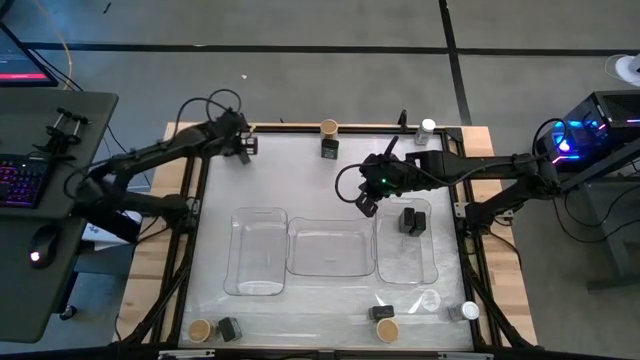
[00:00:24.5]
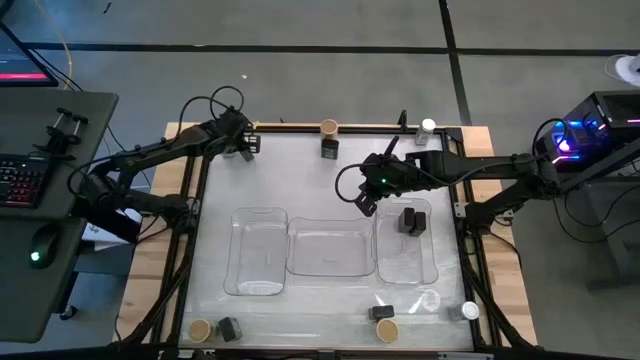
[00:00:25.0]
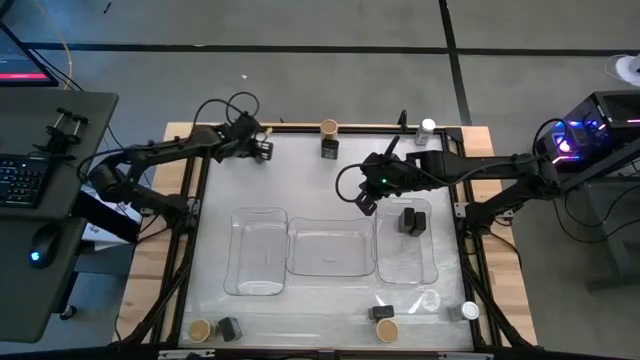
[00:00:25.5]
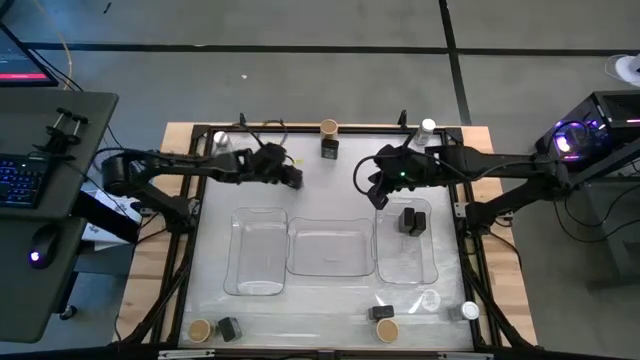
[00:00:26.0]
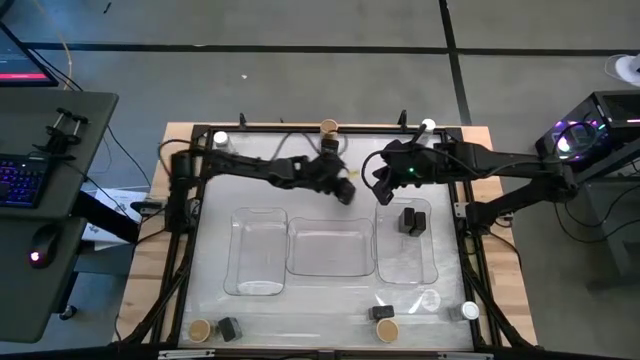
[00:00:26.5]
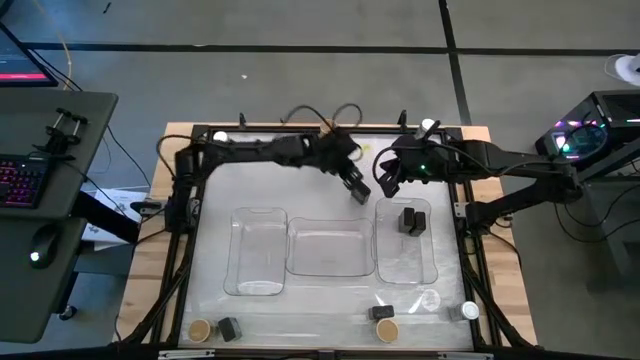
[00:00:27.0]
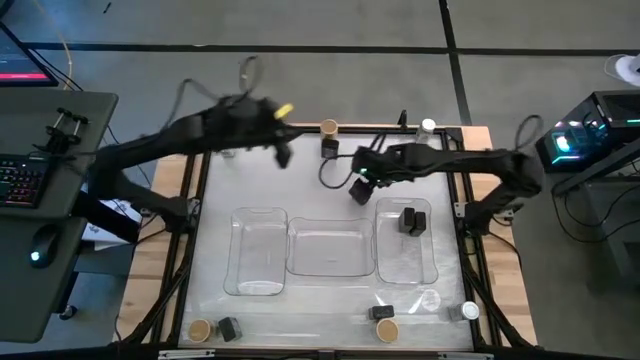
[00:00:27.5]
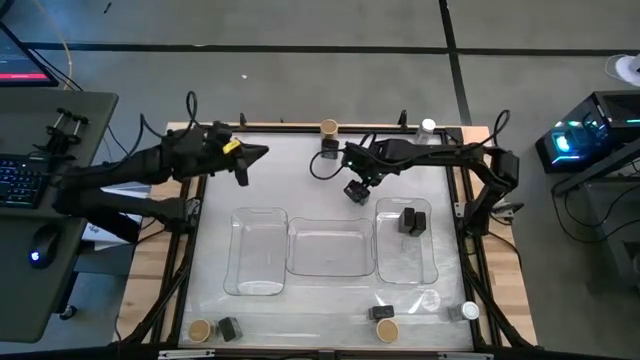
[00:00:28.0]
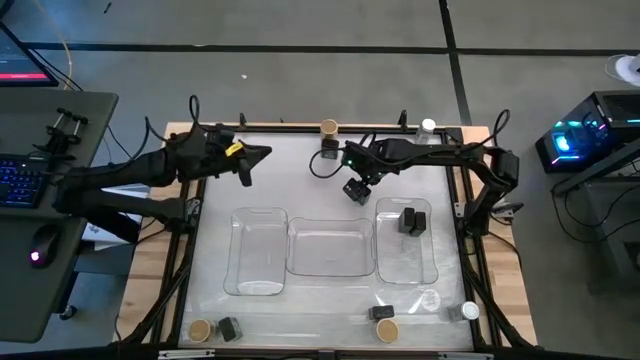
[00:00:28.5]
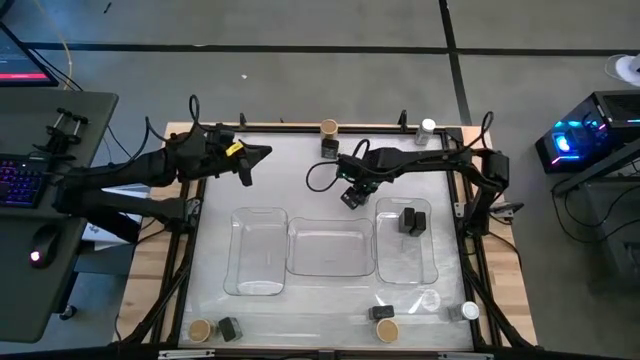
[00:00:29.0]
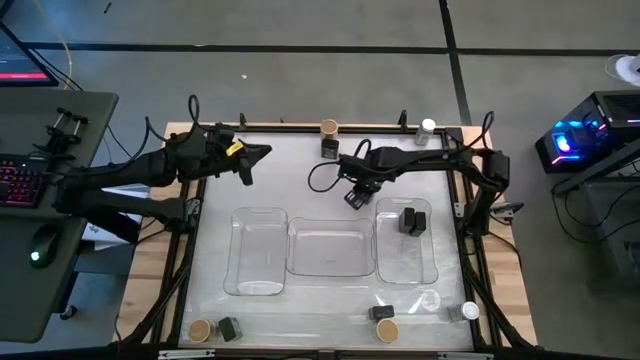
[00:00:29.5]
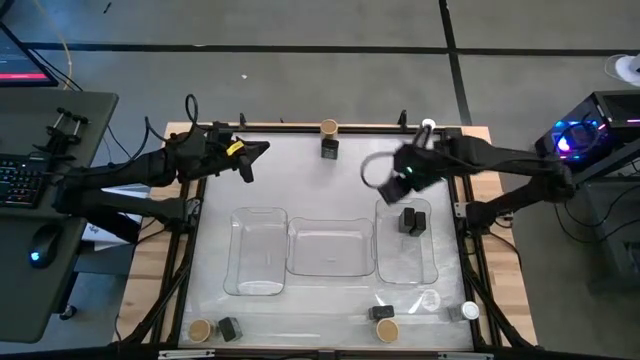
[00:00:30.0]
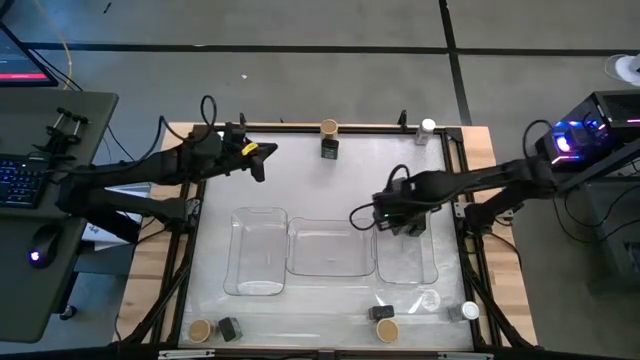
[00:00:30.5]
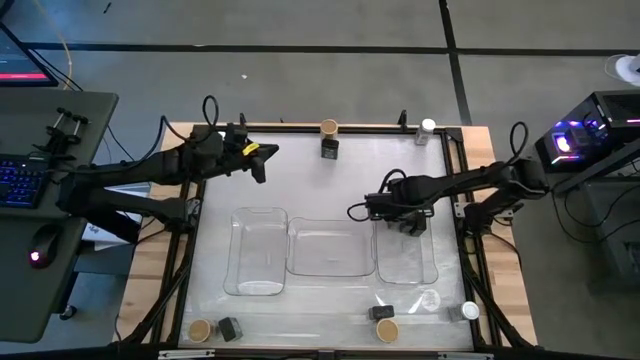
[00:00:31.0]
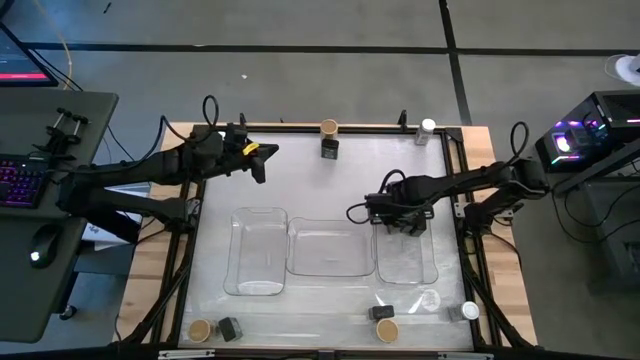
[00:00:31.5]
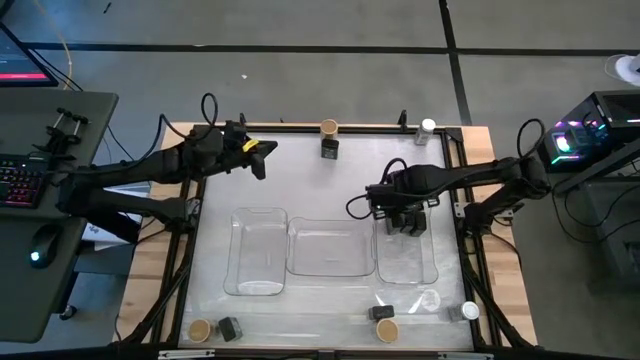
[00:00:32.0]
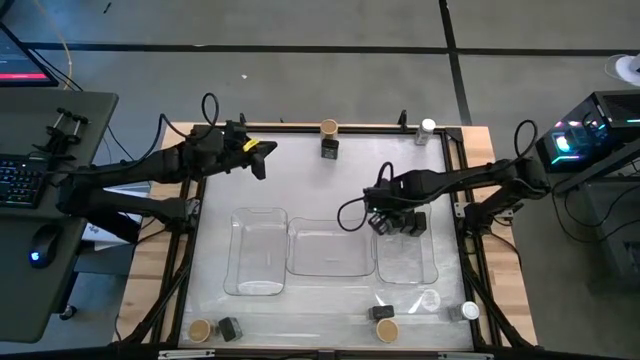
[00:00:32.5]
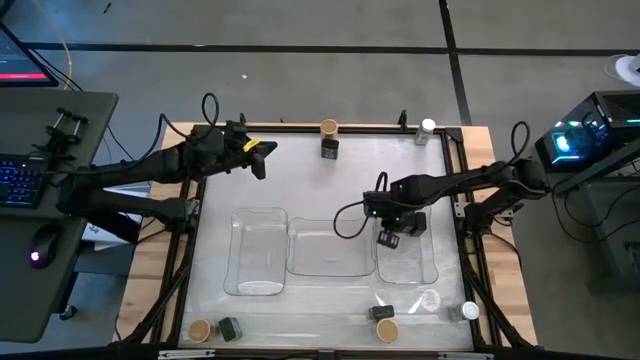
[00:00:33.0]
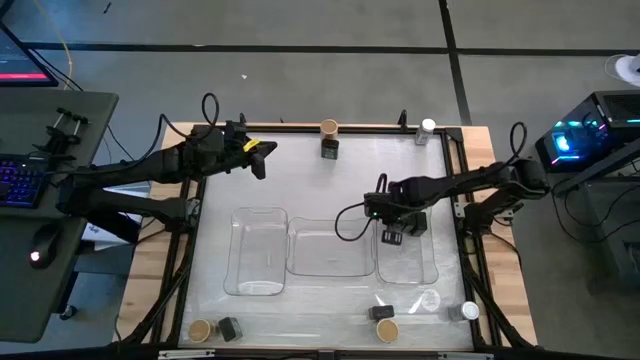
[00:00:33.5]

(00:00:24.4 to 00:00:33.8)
Task: Sort spices by type
Put the black seasoning can into the right transparent bin

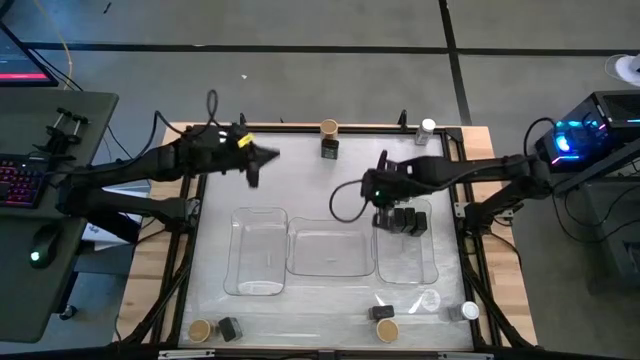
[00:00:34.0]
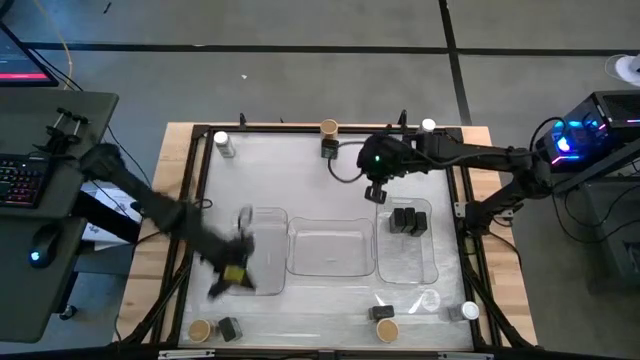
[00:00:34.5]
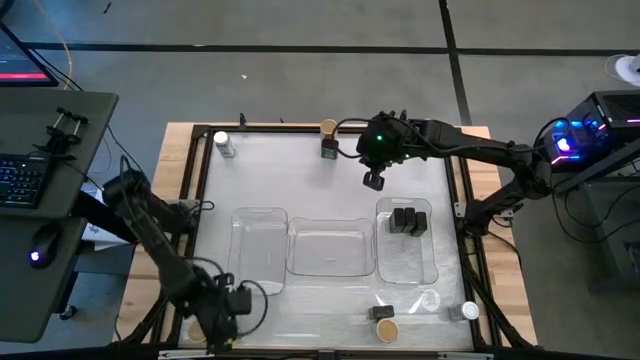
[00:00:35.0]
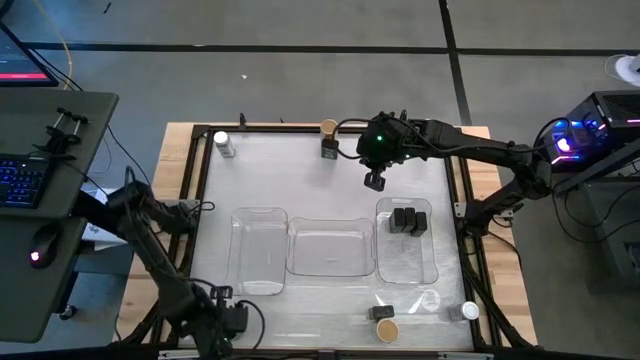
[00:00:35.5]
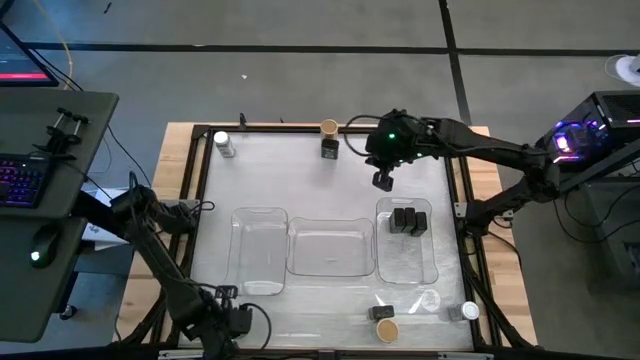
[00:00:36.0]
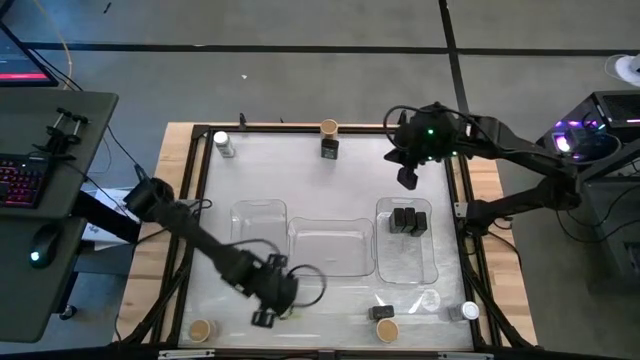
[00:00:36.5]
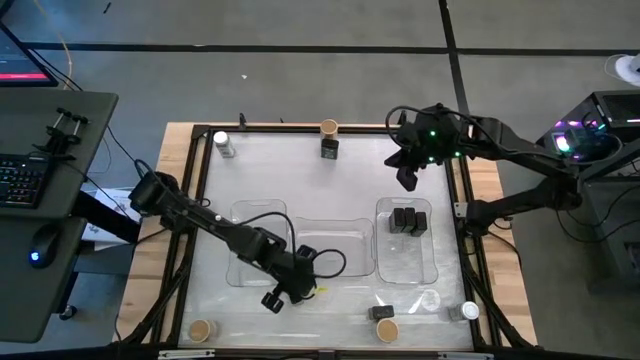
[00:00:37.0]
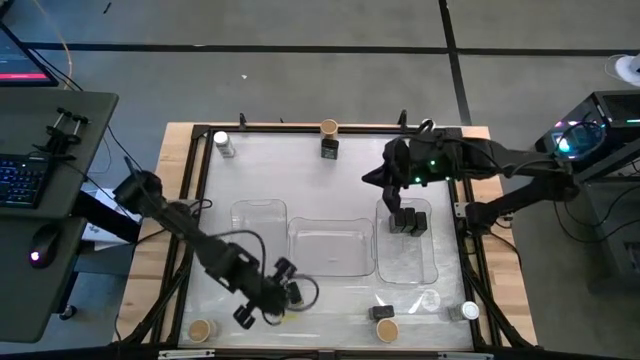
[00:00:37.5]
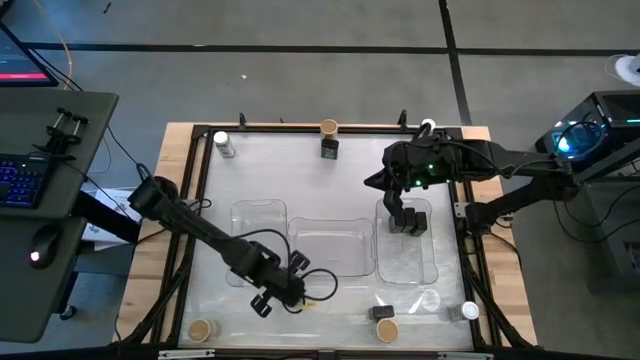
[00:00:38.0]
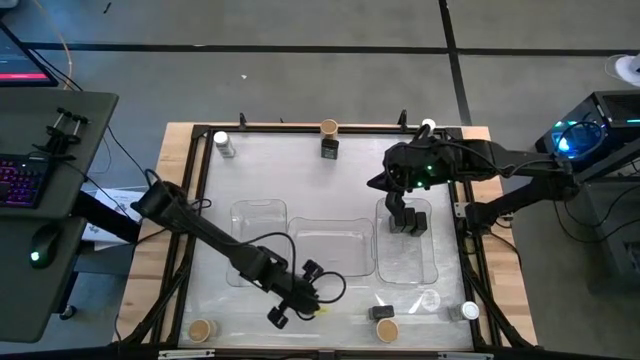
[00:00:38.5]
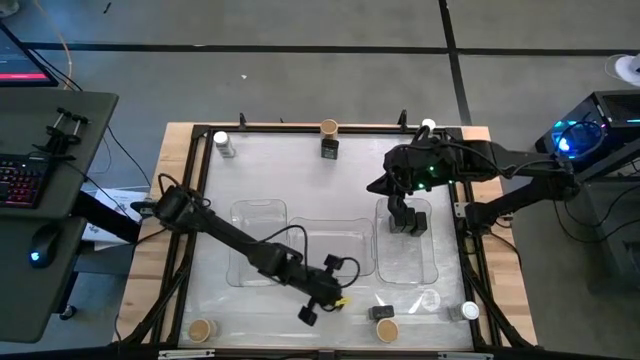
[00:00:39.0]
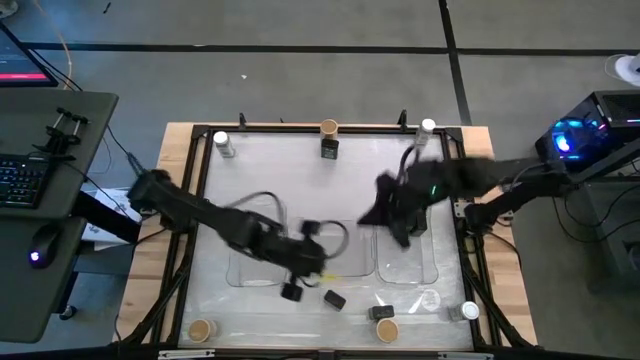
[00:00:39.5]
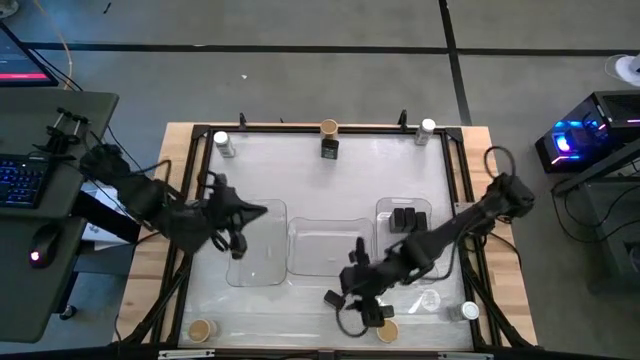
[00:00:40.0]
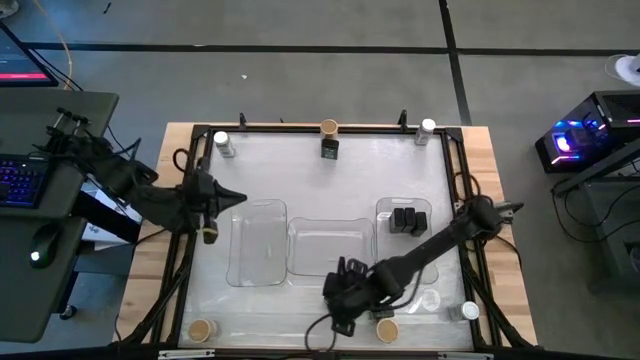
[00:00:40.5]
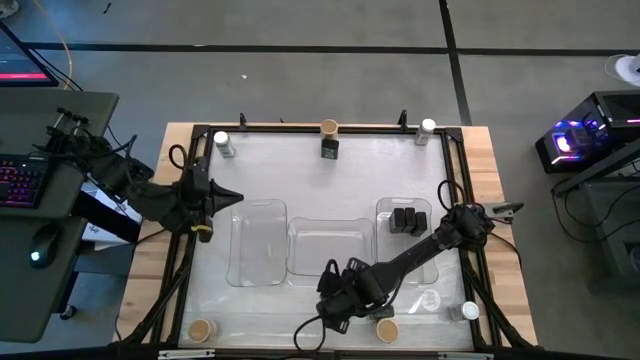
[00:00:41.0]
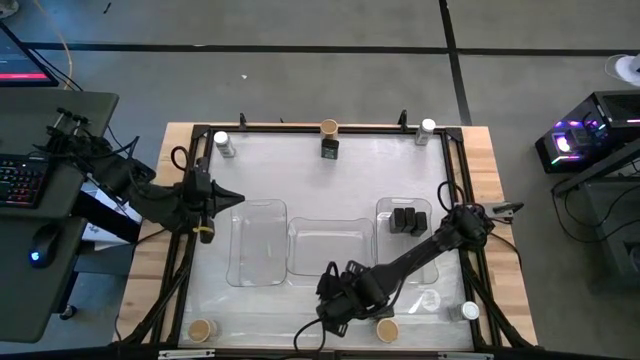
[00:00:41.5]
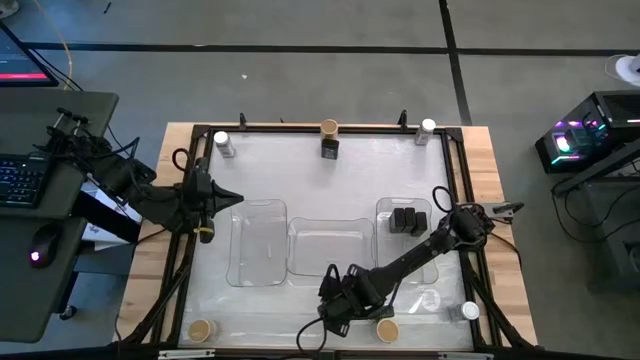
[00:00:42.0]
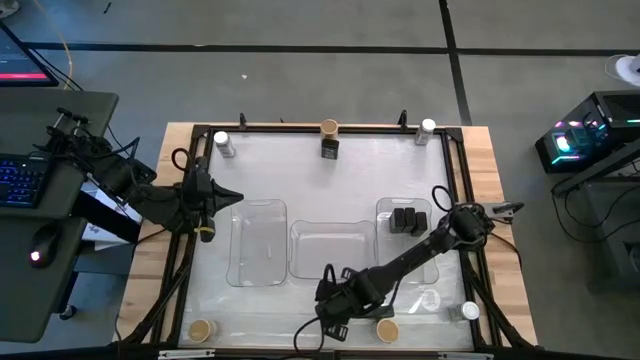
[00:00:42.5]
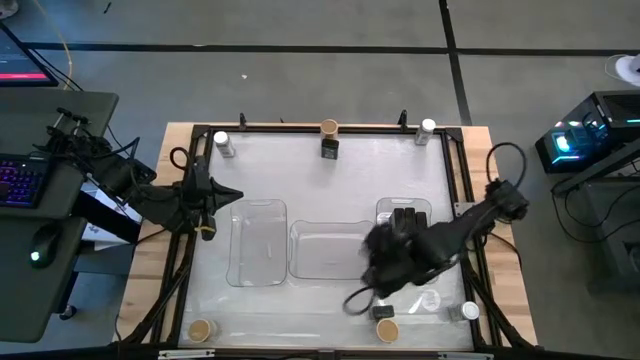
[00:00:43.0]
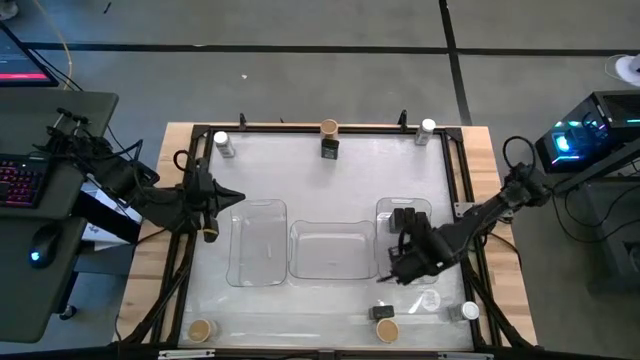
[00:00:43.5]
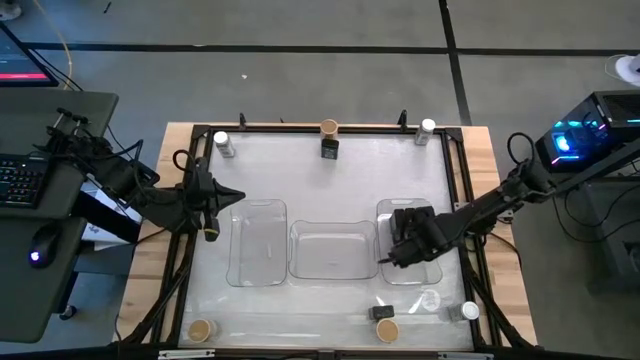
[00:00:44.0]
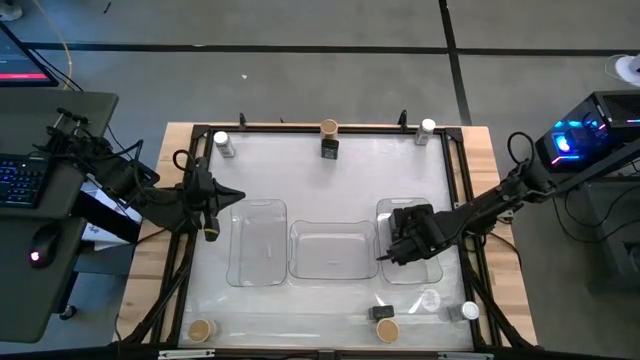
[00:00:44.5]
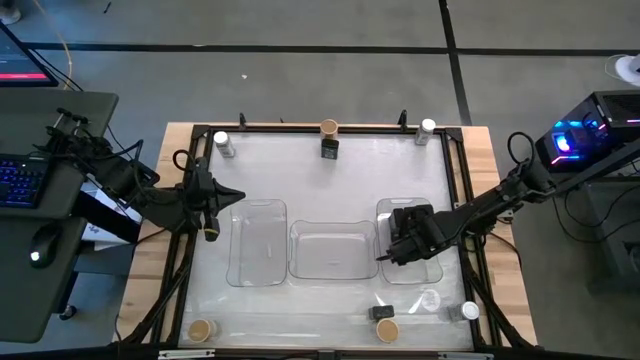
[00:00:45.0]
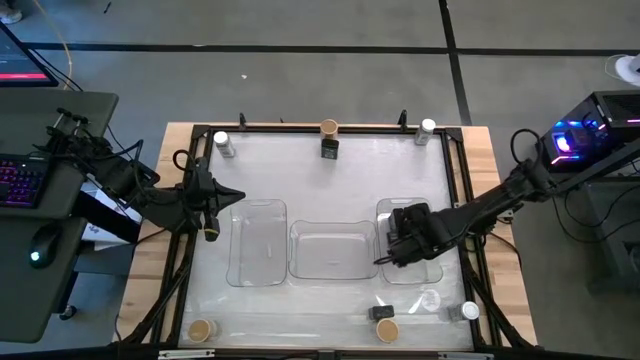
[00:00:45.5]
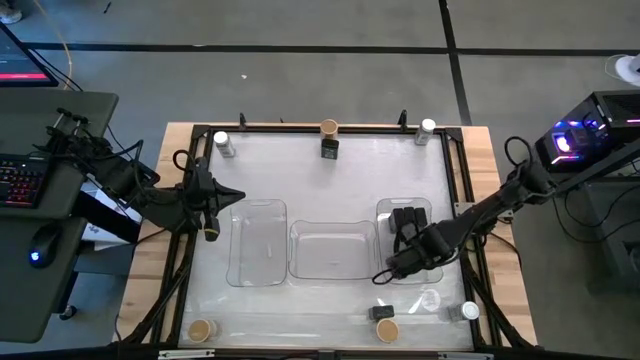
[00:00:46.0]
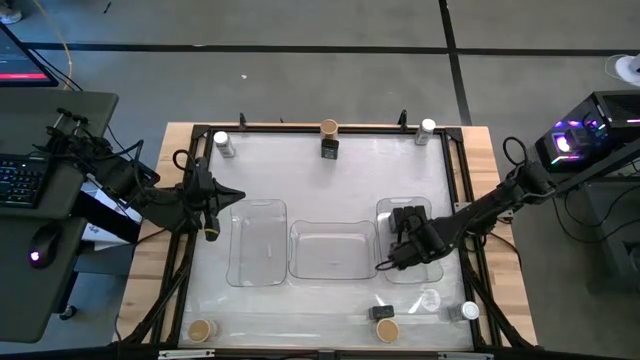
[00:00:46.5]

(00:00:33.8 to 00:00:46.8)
Put the black seasoning can into the right transparent bin in front of the other black seasoning cans
